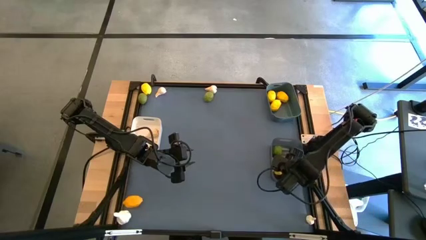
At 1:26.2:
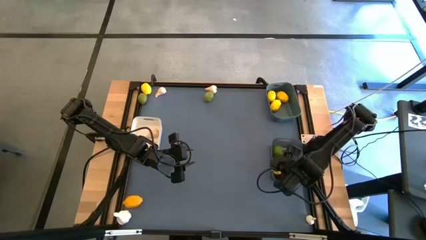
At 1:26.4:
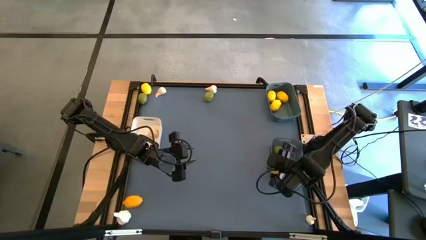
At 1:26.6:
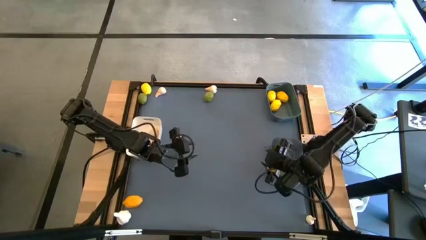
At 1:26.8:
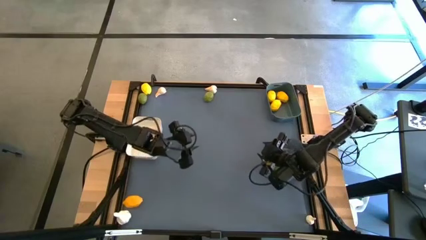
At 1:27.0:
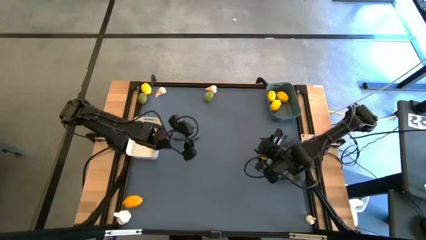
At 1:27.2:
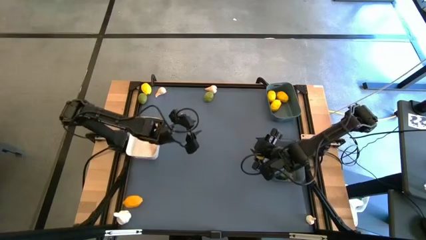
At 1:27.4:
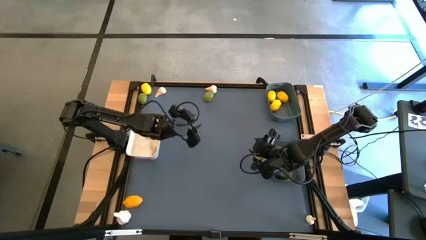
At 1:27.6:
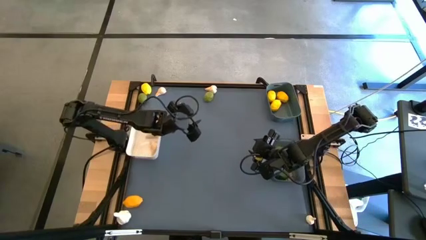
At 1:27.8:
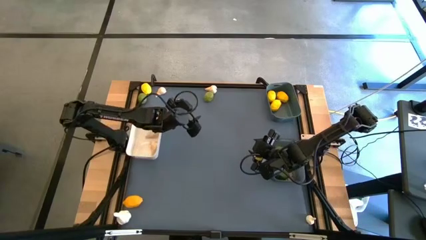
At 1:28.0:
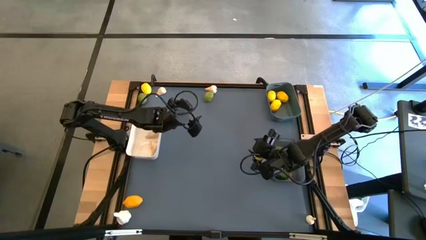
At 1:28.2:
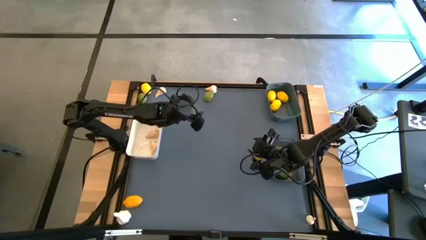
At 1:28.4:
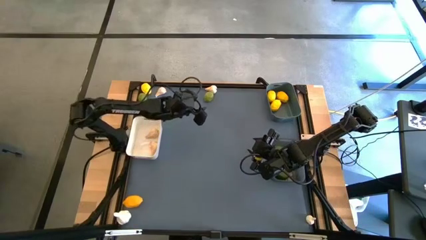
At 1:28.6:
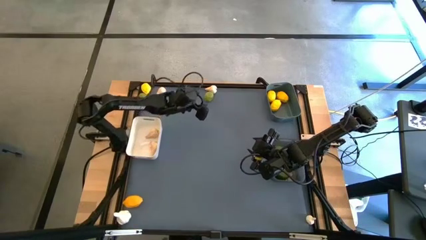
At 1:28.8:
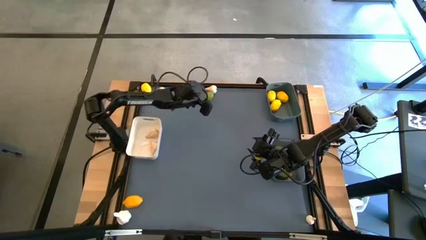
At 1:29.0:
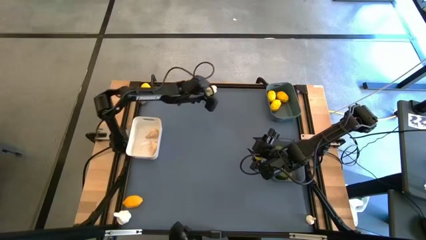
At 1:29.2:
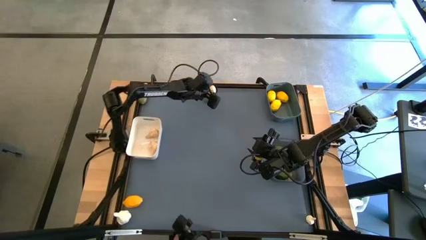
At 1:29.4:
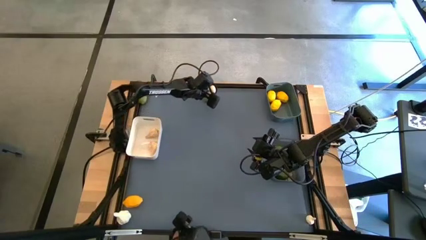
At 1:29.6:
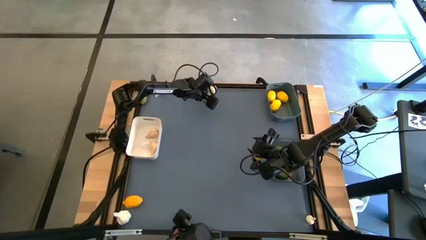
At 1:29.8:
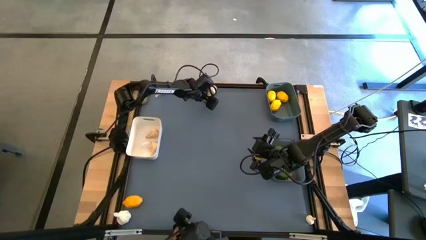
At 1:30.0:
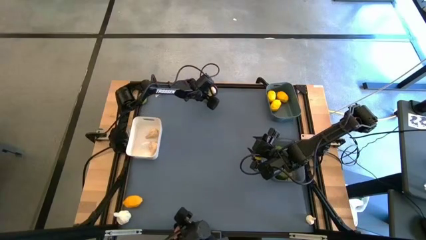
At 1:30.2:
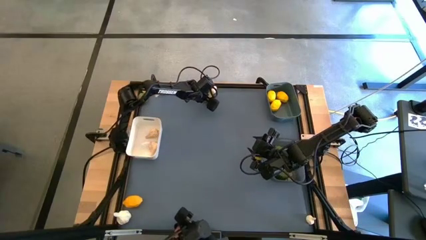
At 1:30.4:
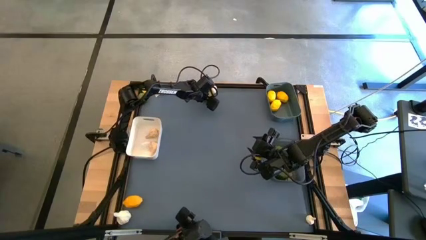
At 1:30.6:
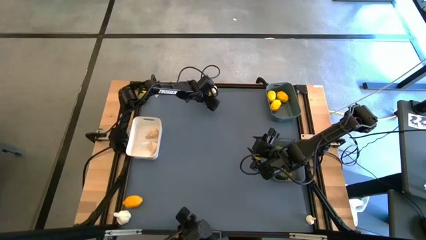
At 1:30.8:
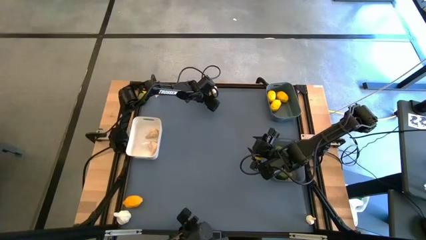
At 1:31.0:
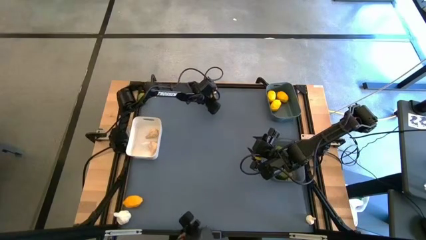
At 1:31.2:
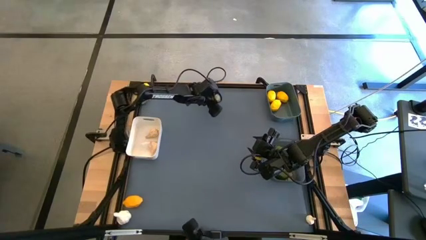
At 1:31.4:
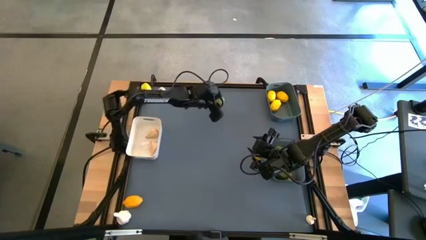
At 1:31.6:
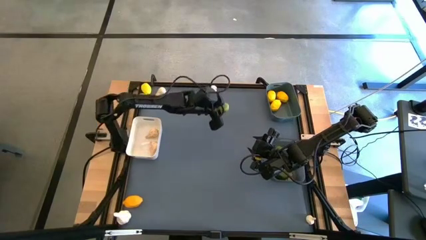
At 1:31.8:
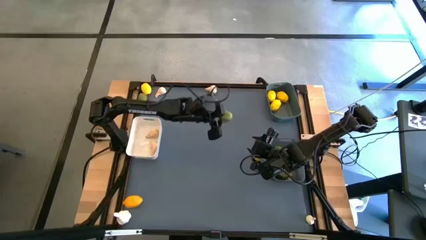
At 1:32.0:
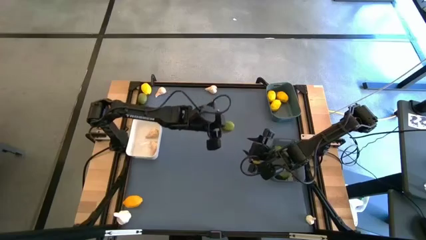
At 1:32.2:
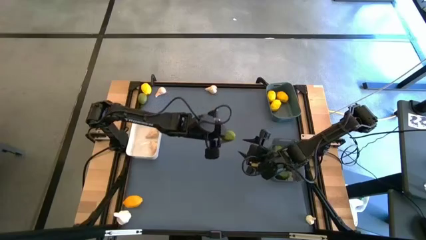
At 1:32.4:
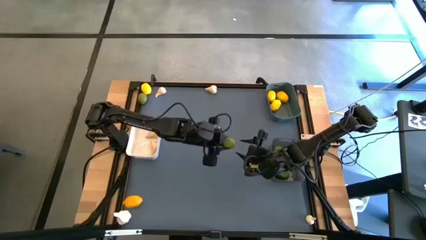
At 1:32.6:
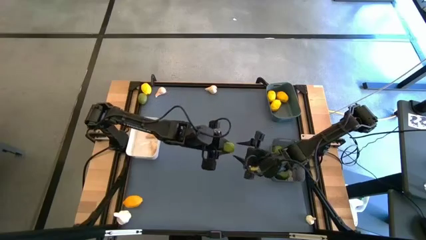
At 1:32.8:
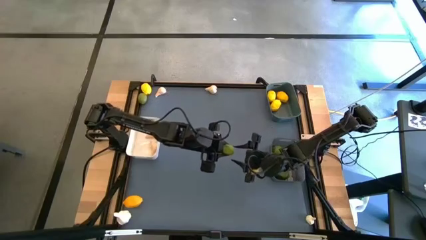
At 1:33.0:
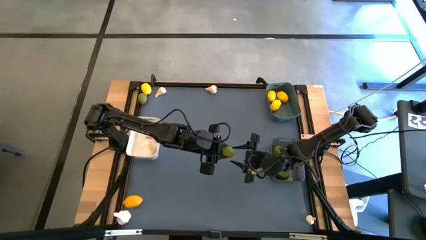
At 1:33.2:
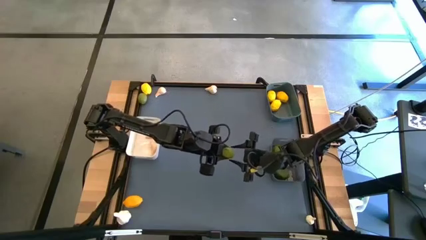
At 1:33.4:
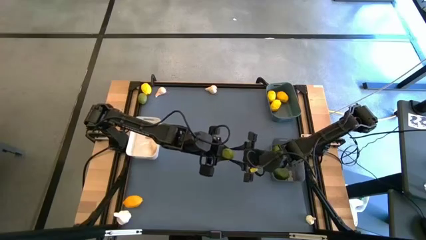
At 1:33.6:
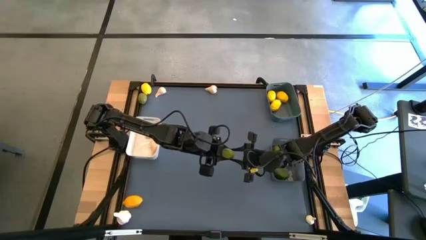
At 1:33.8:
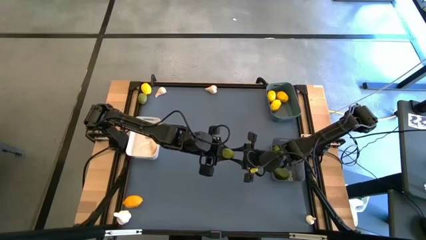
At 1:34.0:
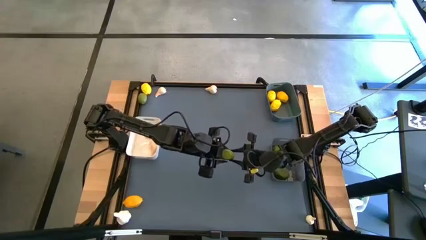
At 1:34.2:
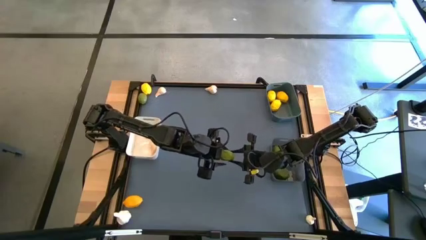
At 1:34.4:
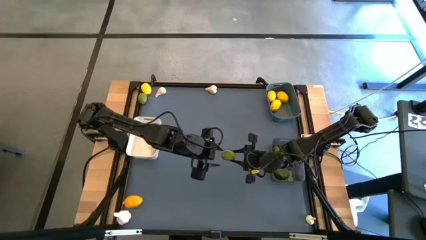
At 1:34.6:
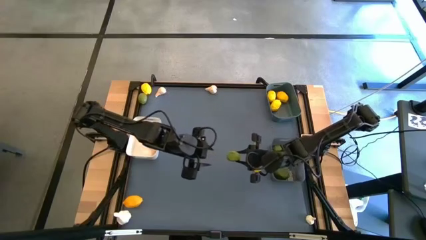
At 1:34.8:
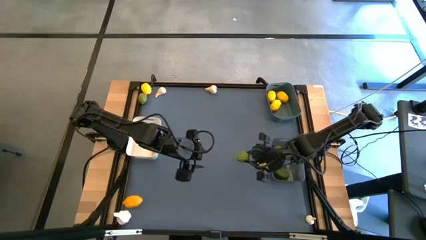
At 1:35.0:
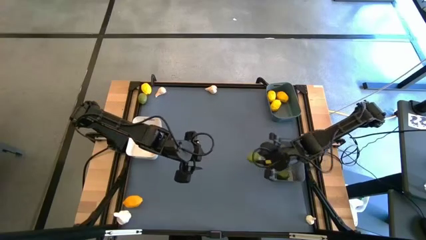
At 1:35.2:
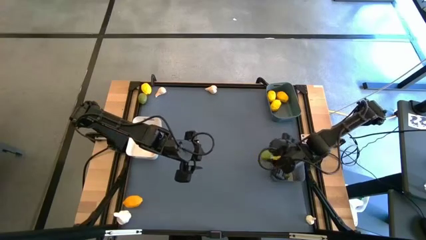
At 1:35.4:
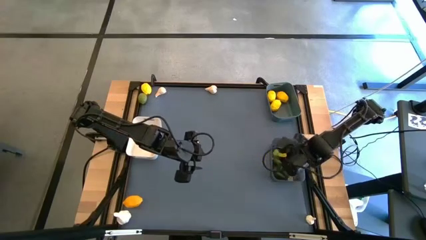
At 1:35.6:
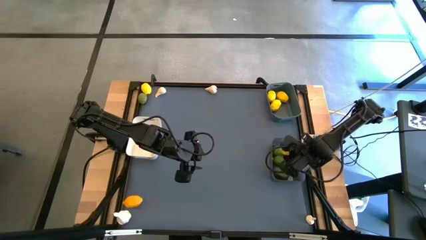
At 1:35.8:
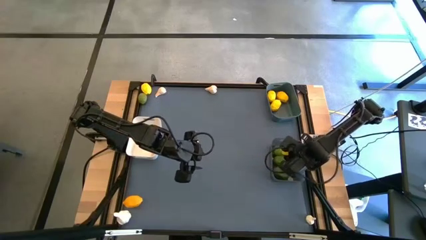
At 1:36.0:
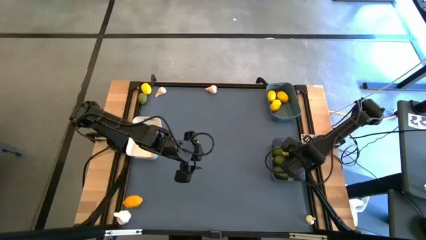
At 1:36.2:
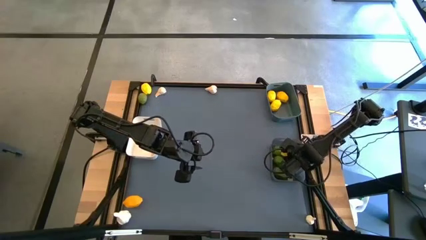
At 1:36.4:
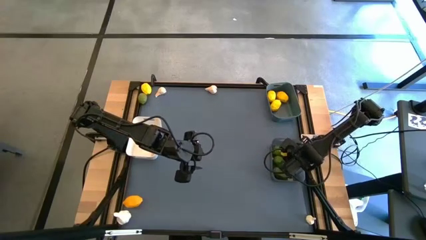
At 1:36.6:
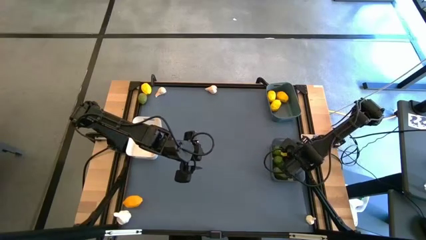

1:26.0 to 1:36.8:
Task: Sort produce into baskets
Put the lime into the black bin

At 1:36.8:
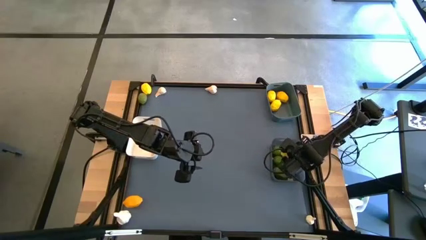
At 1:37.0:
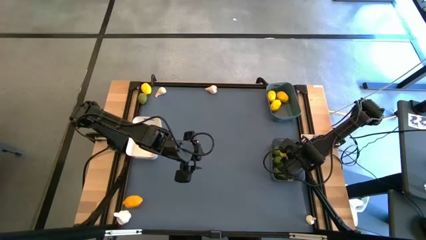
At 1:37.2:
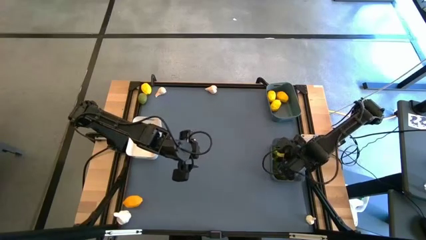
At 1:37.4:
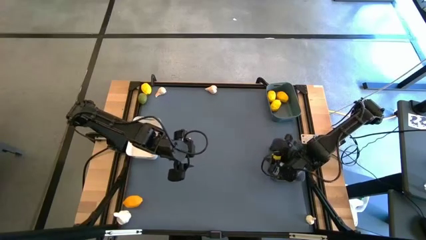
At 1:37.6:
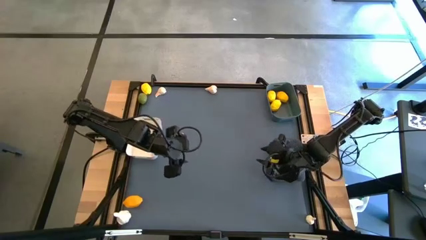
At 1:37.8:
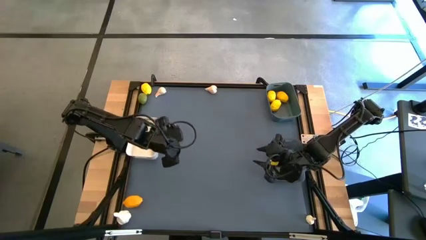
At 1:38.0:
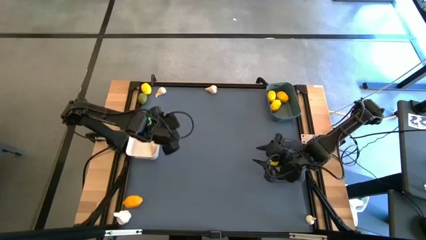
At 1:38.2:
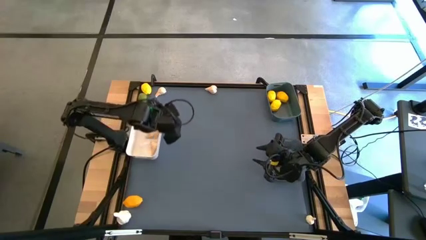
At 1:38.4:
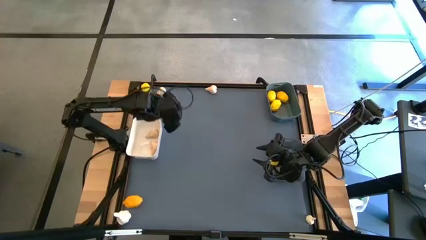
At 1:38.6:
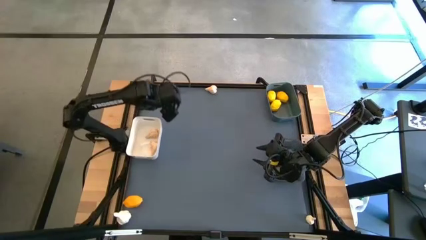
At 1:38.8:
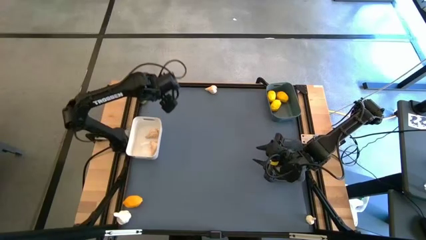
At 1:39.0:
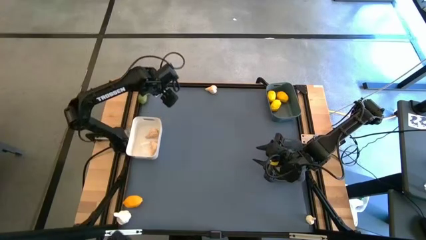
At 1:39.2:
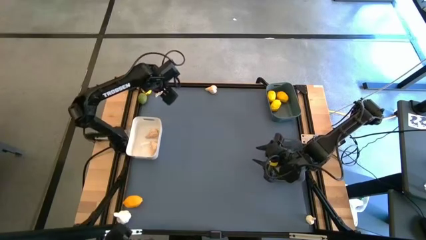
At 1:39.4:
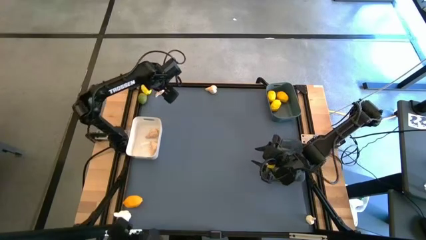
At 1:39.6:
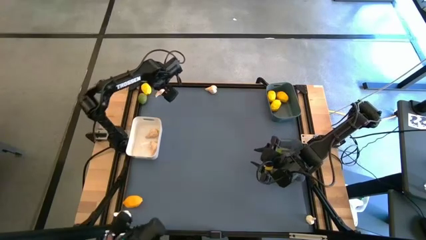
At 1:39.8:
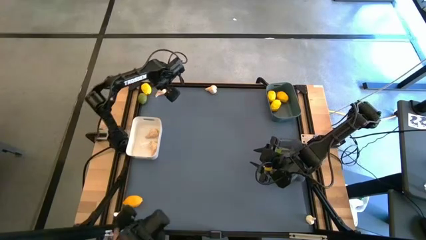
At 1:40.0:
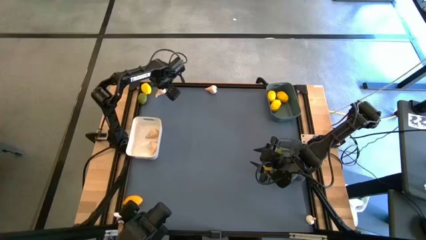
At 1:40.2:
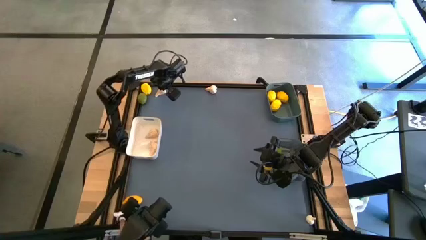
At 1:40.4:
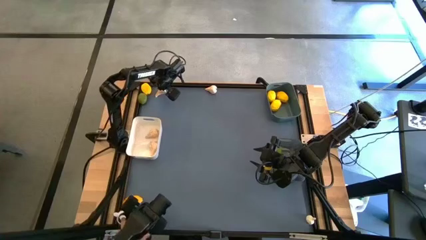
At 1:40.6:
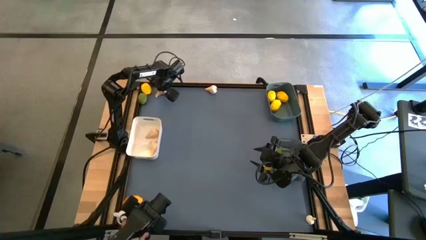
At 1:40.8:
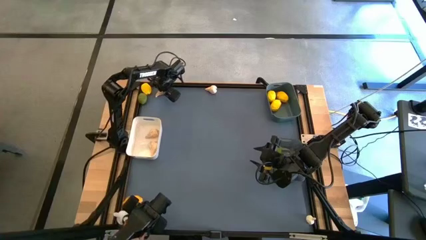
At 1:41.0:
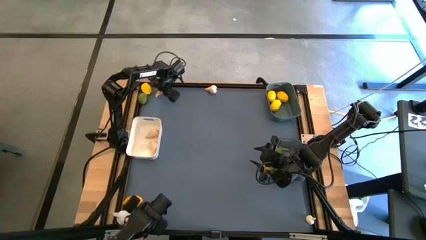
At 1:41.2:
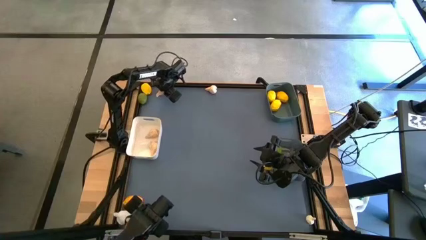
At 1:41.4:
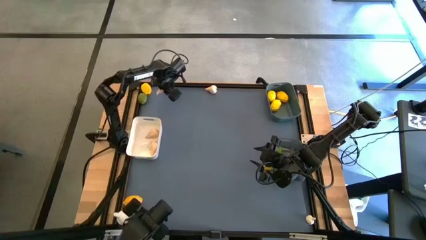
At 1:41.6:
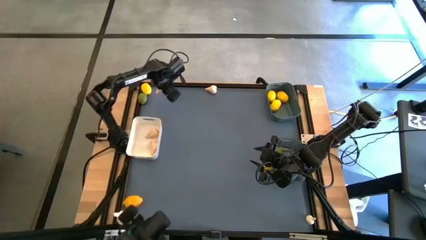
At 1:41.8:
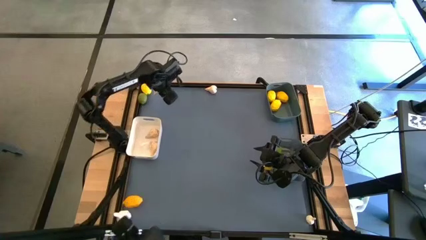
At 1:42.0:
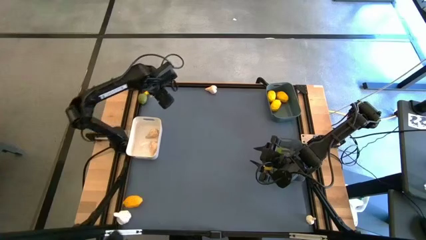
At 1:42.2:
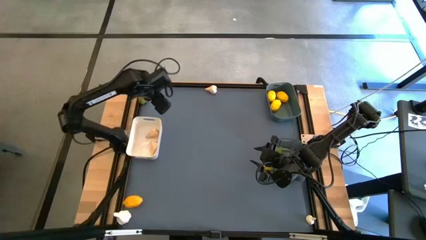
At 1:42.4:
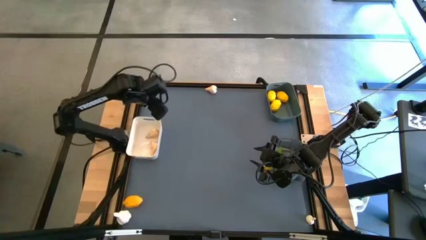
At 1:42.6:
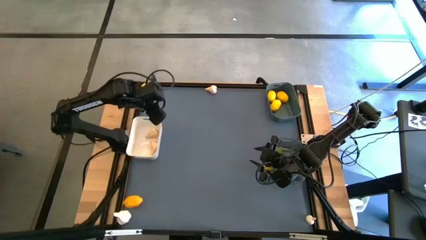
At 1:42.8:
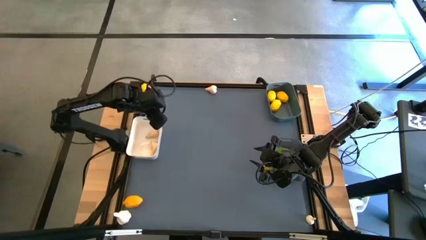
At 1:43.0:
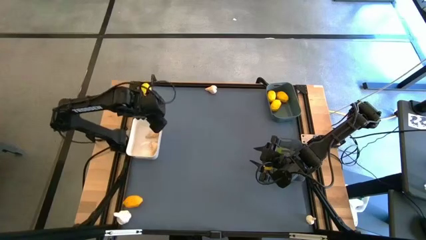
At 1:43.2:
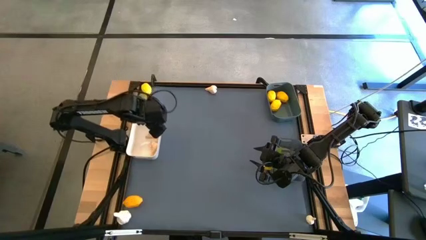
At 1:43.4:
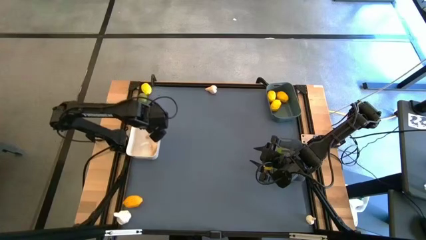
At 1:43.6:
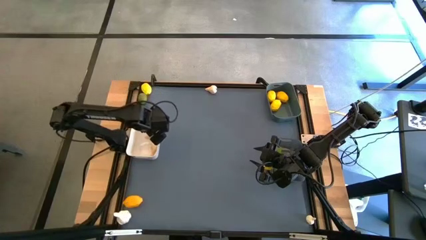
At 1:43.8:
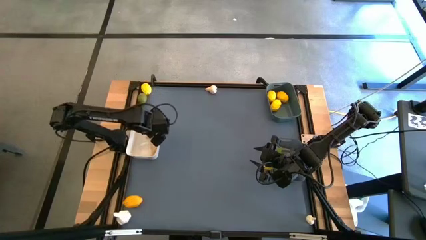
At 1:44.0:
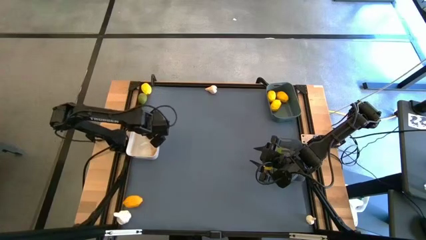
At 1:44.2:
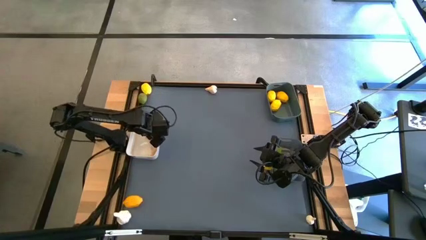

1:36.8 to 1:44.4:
Put the garlic into the white bin
